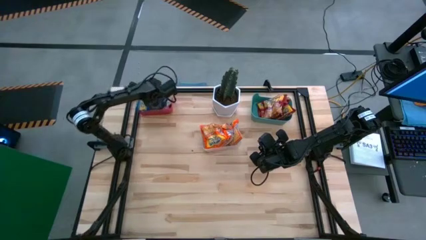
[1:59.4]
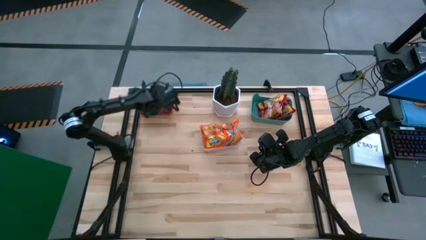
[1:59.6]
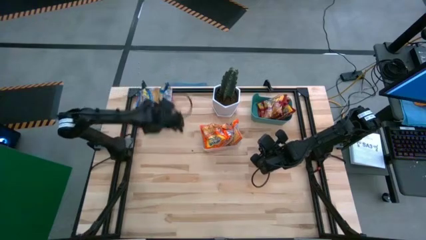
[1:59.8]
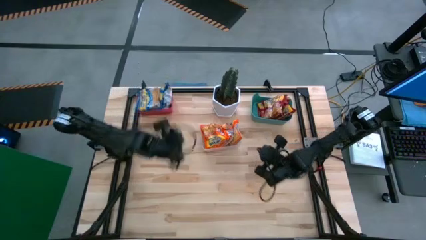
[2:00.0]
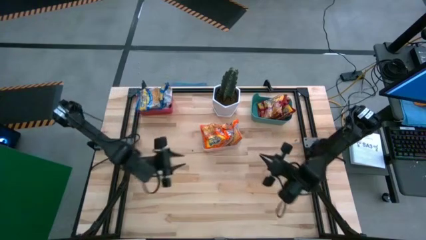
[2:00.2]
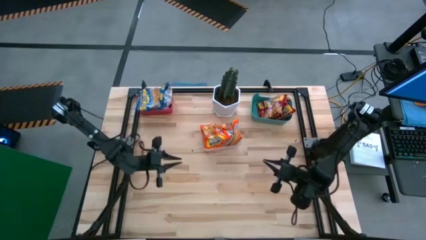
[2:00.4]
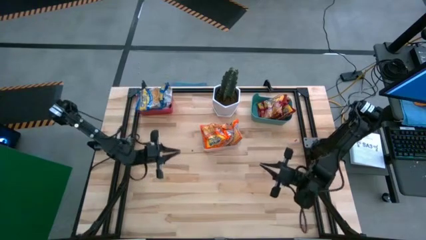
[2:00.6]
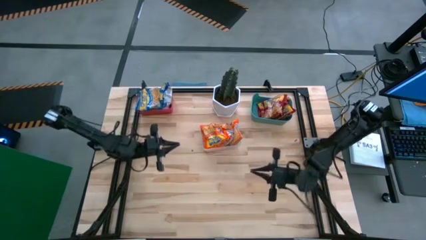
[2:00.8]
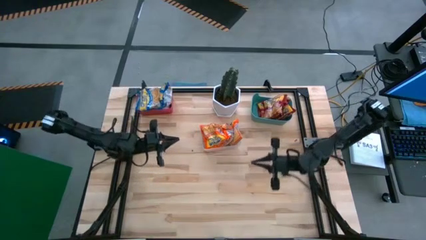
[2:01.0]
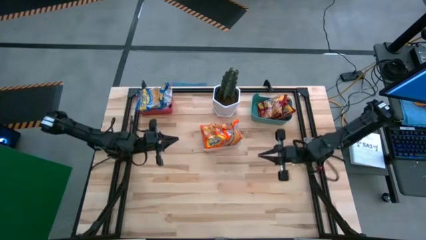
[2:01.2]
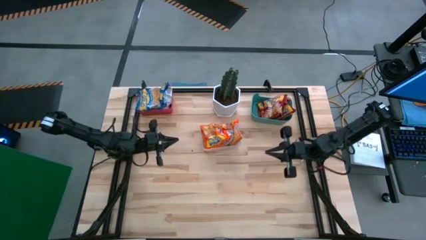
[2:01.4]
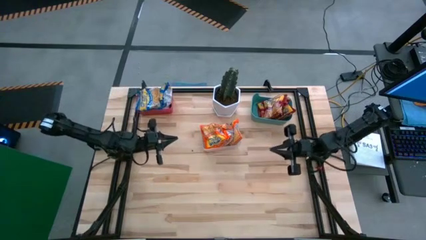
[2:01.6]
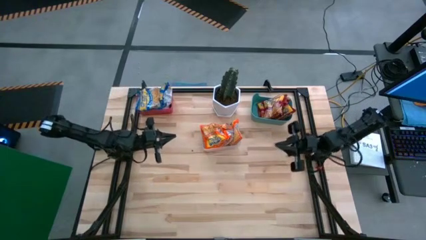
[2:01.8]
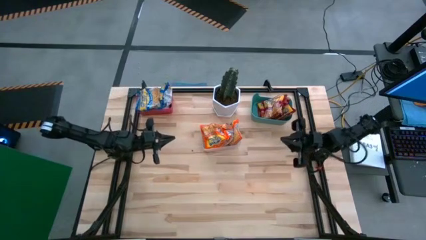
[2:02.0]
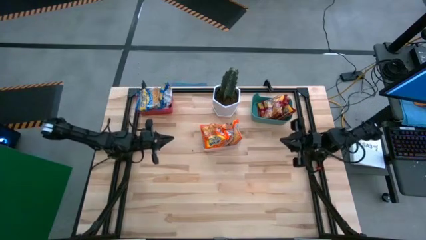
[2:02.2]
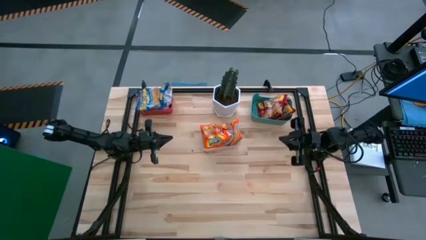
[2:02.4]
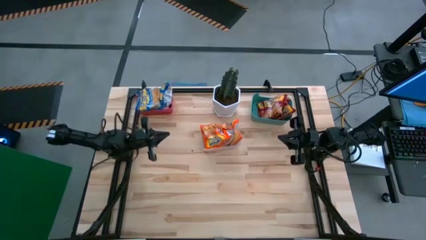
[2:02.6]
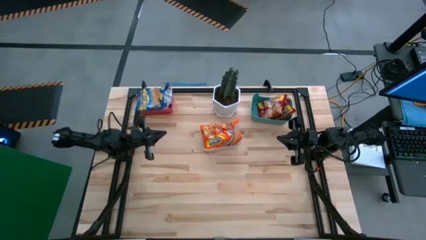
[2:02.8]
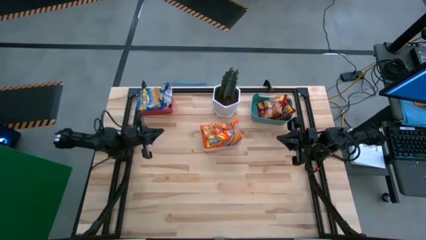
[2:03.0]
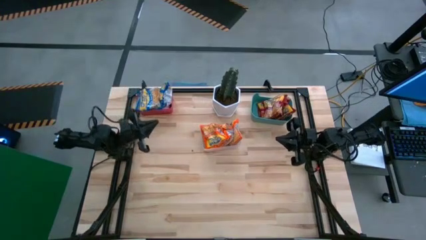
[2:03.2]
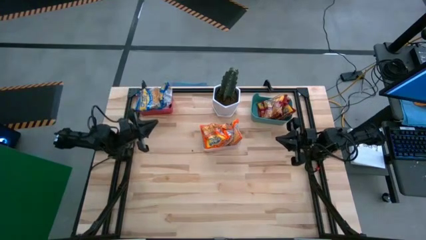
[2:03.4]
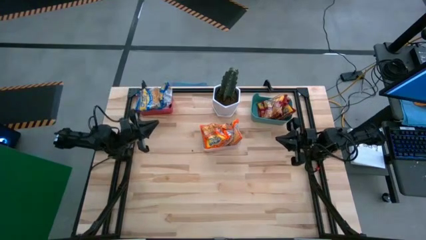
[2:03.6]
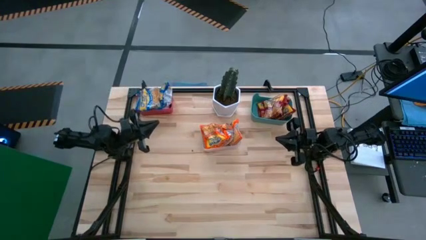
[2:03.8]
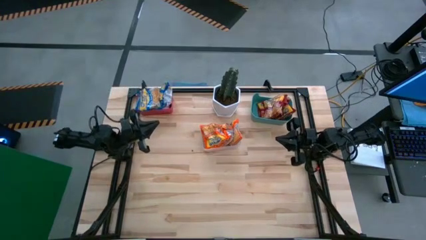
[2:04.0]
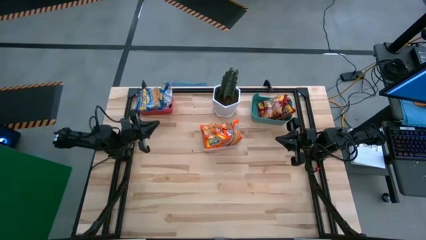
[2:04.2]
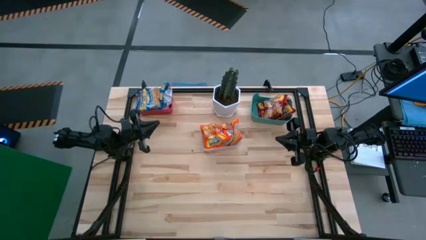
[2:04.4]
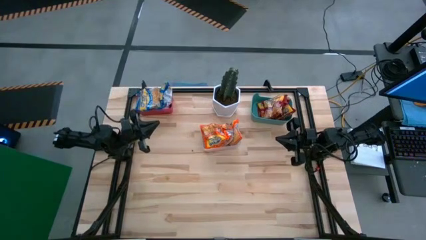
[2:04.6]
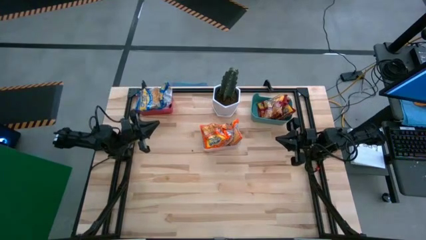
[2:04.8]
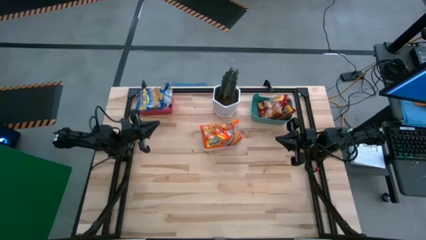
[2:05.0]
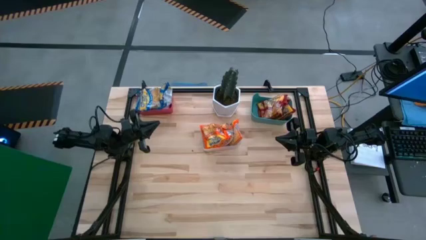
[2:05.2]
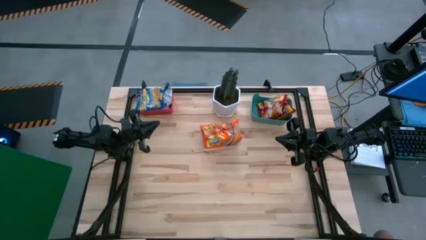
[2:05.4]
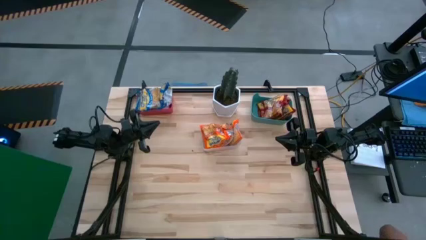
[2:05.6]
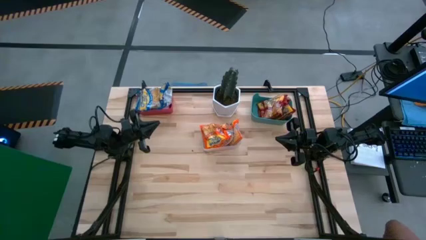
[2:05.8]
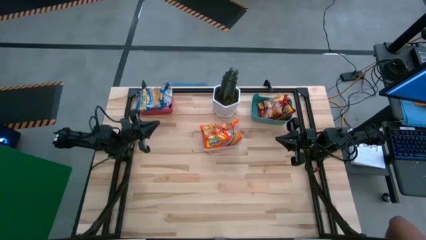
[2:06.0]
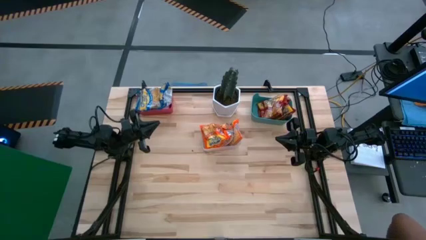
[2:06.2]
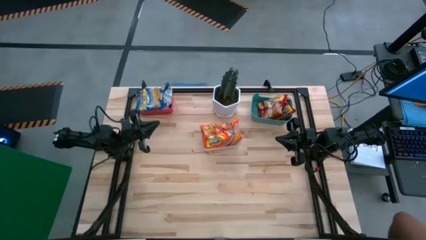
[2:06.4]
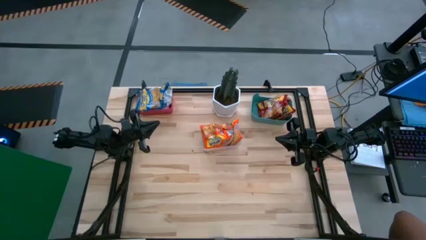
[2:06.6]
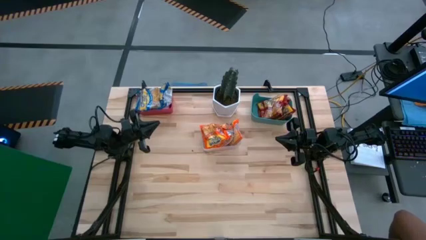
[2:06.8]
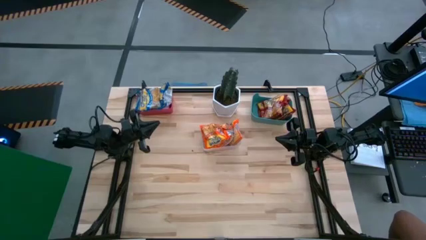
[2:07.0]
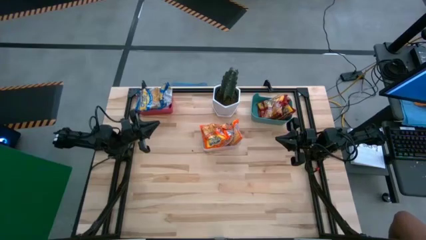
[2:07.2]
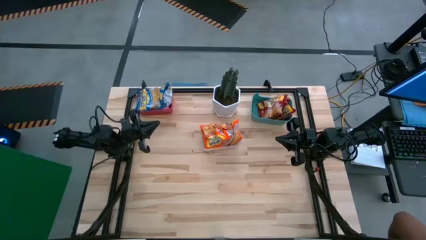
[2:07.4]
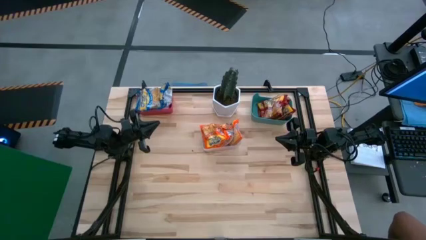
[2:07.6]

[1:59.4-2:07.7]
Task: Sort Maruchan noodles
Return to Home Position

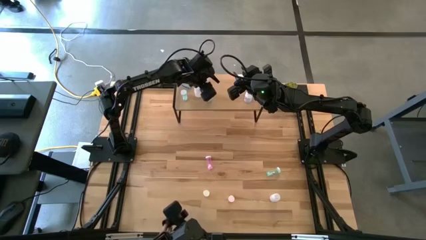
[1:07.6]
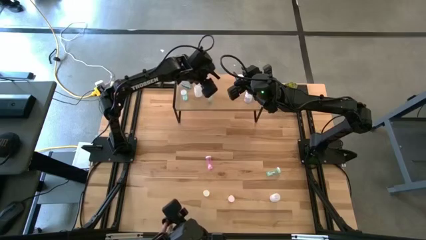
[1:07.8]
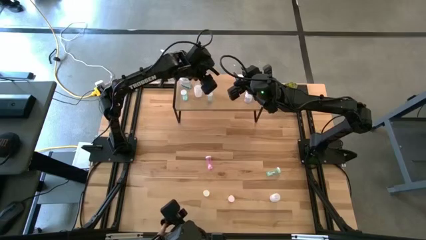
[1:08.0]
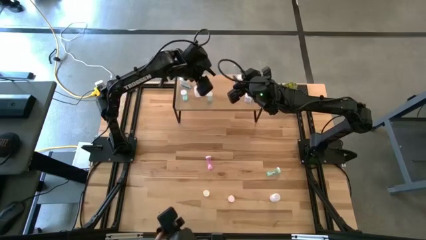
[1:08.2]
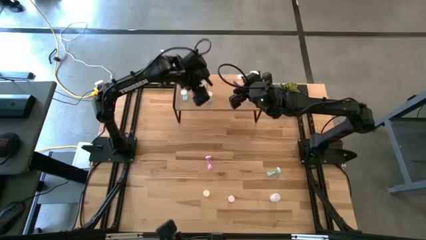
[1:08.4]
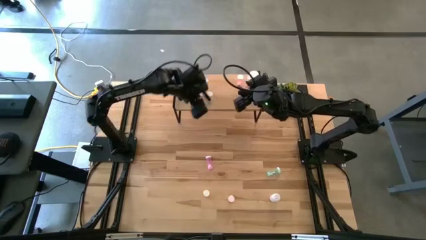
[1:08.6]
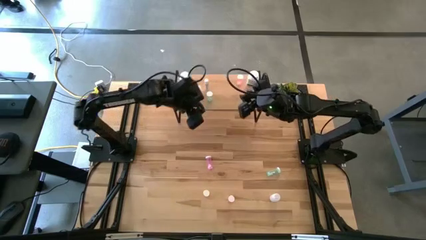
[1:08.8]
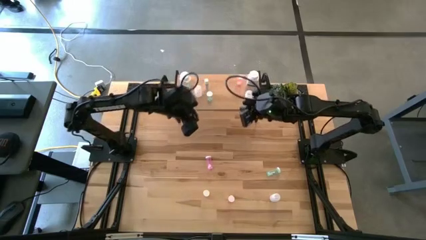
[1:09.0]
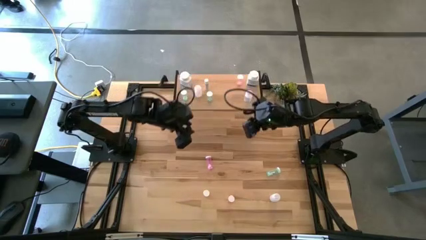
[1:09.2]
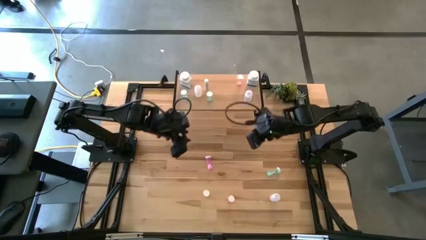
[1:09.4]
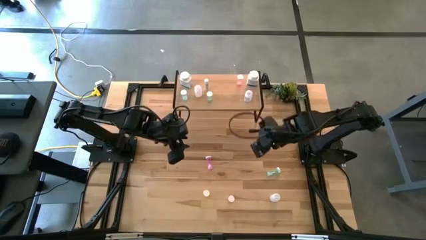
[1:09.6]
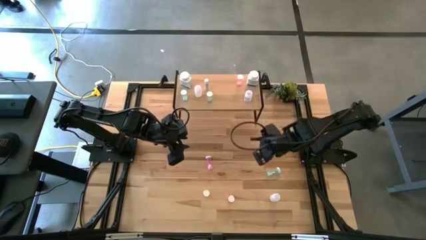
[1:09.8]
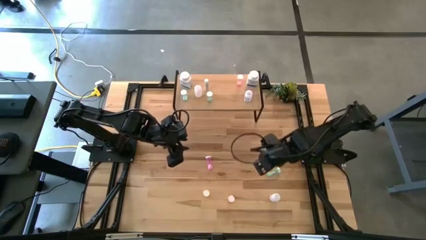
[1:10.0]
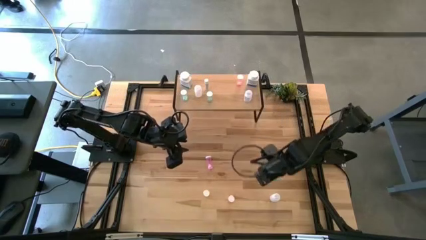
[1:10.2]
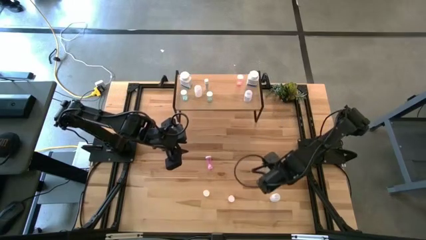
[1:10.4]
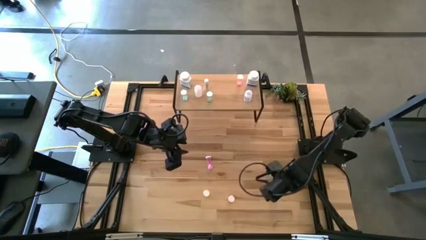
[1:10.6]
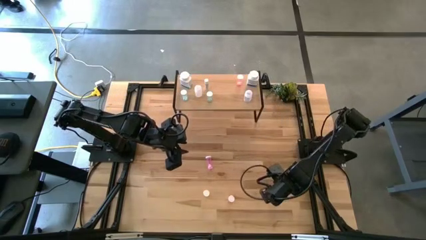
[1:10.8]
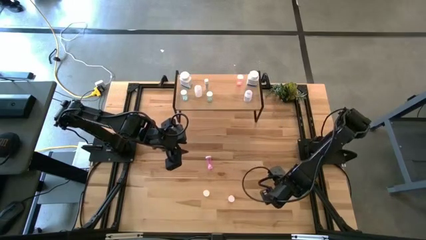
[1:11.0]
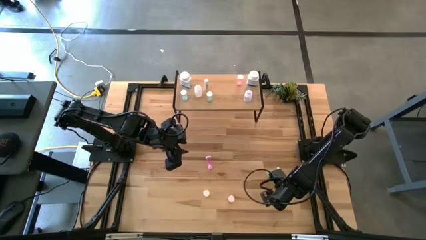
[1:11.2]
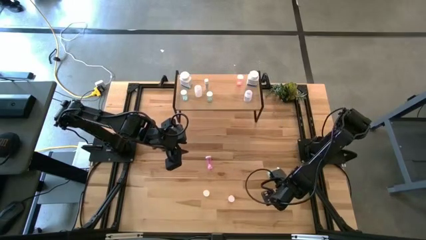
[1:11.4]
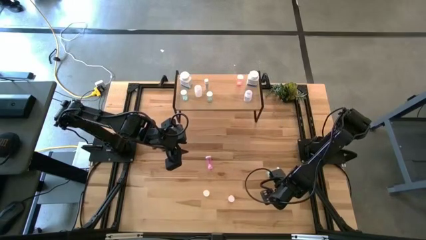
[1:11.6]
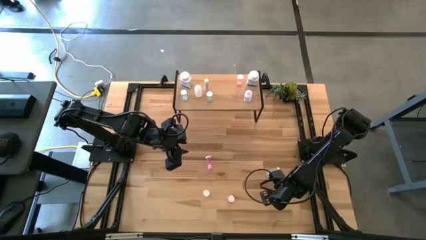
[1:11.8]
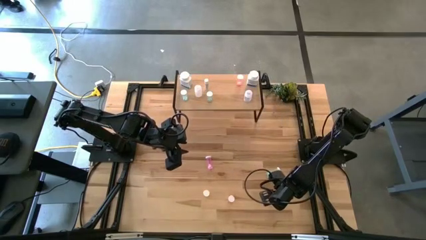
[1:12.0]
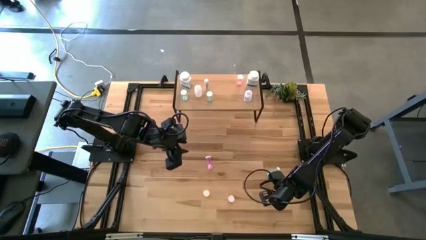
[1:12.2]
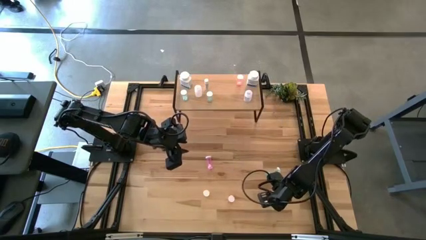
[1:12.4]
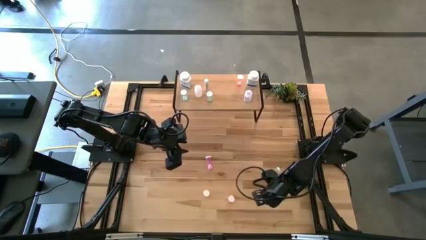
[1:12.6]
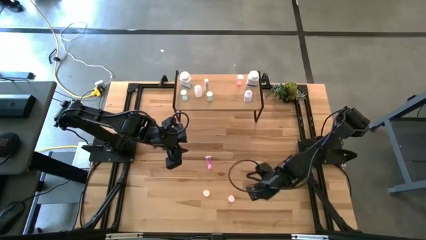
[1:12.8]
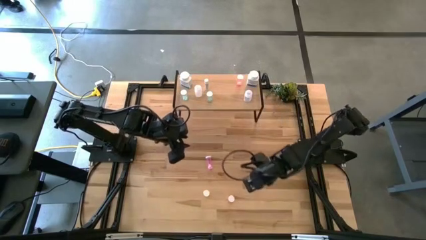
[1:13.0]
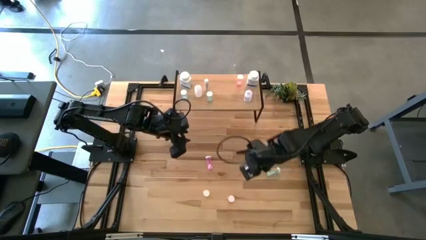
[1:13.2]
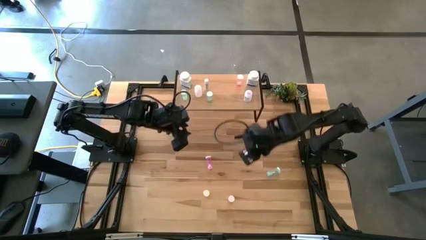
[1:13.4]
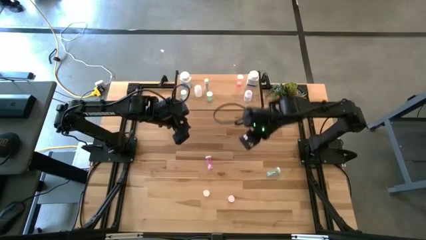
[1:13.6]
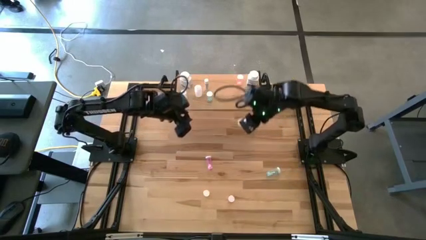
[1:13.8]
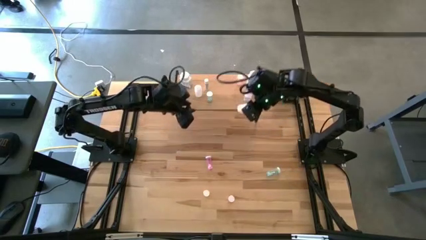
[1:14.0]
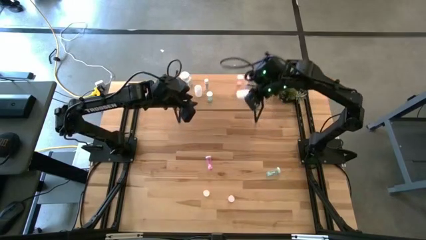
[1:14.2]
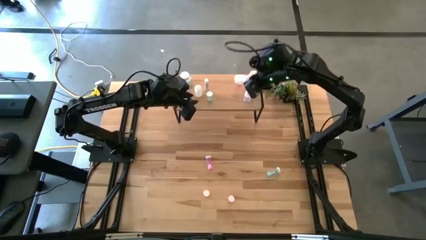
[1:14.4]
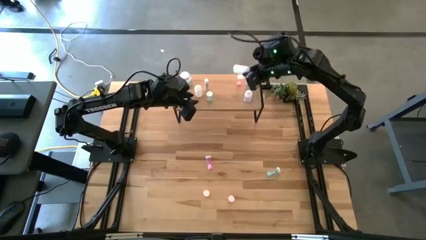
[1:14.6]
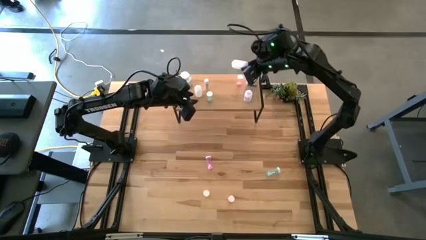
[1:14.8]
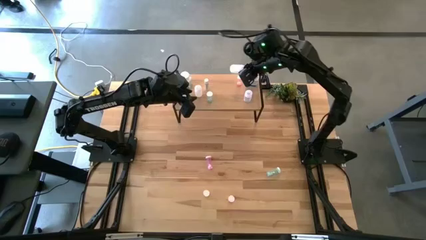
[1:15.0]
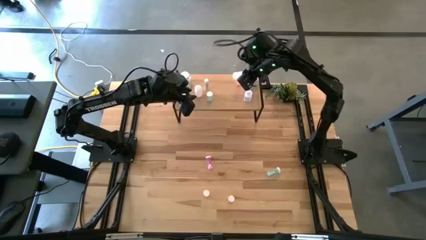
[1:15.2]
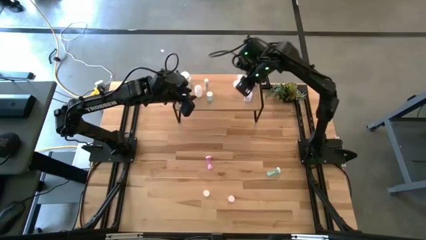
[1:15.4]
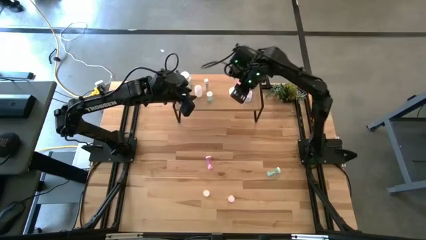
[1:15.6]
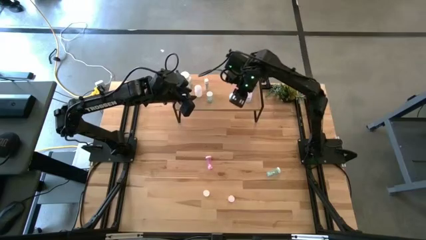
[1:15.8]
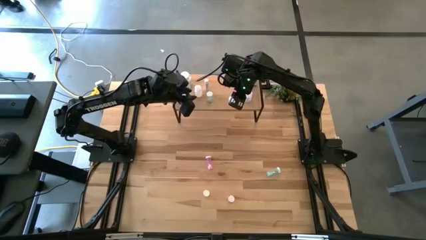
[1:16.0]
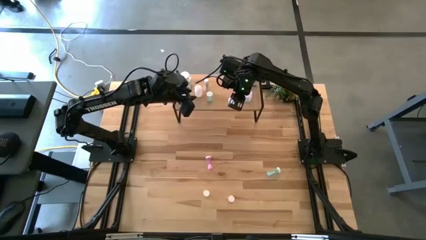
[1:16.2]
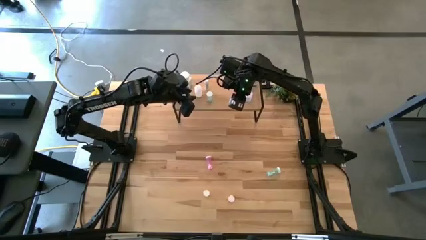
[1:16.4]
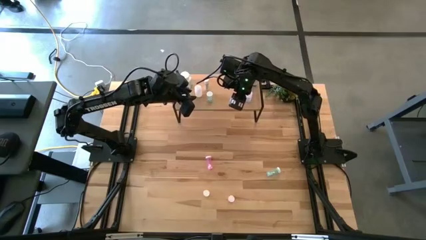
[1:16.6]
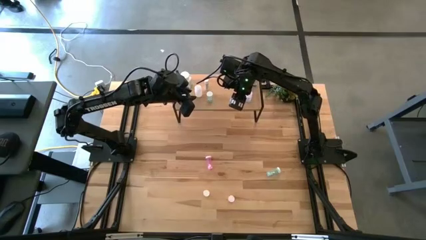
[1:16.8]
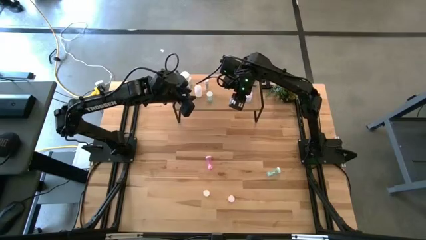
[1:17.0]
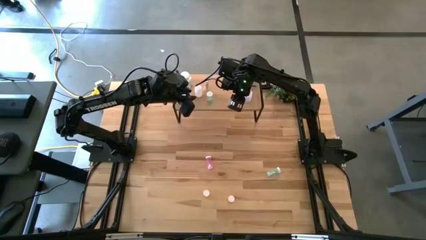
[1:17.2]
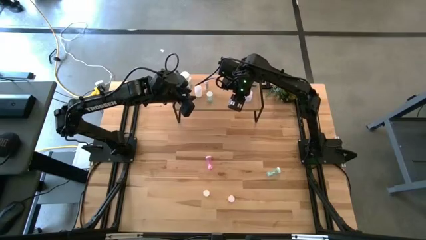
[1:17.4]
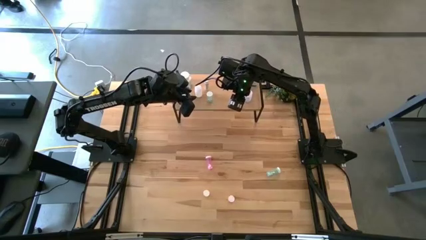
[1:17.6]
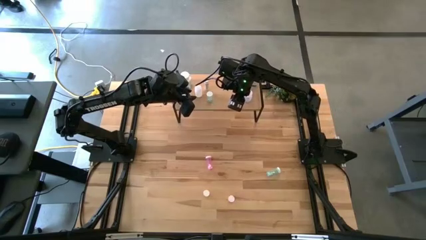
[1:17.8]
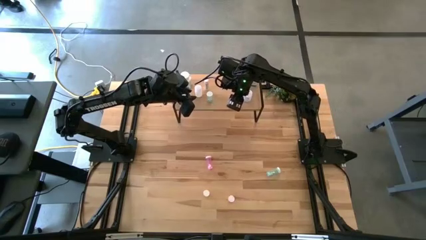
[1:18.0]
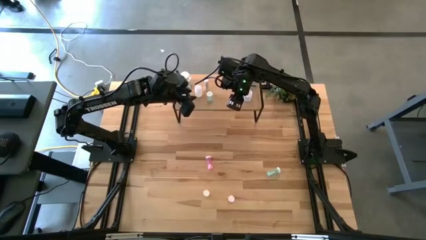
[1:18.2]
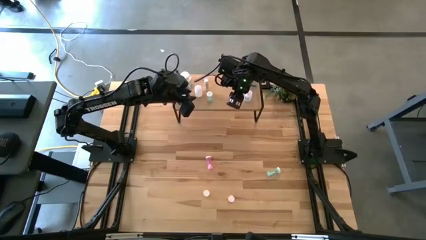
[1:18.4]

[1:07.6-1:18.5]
Task: Pick and place medicine bottles onto shelf by color
Put the transparent medicine bottle on the shelf
